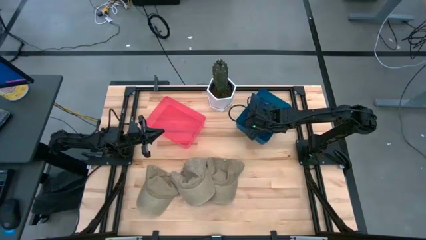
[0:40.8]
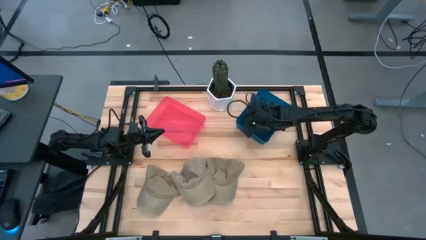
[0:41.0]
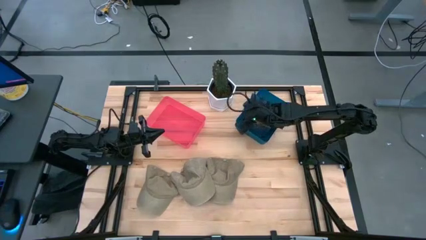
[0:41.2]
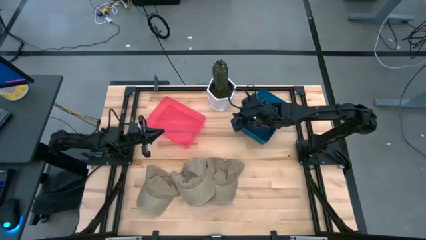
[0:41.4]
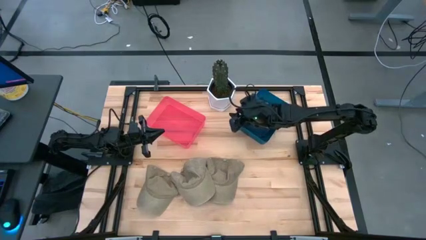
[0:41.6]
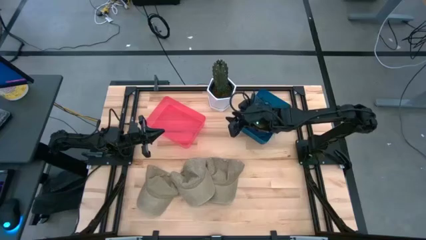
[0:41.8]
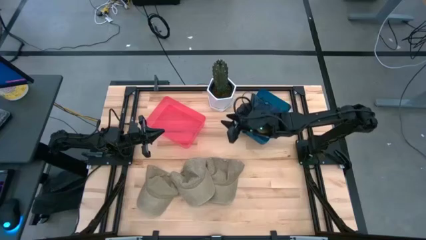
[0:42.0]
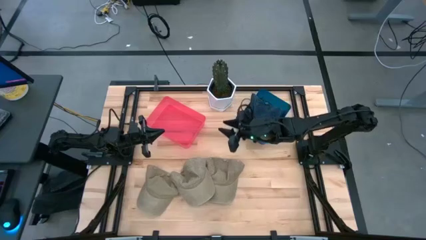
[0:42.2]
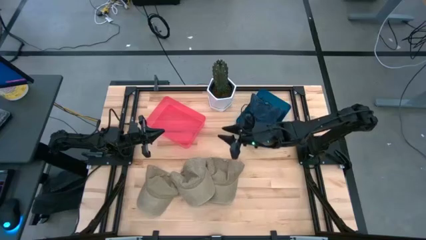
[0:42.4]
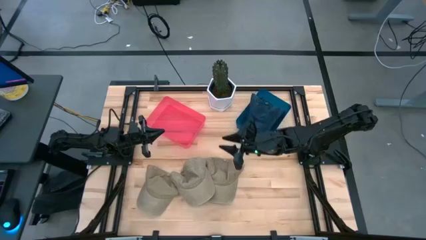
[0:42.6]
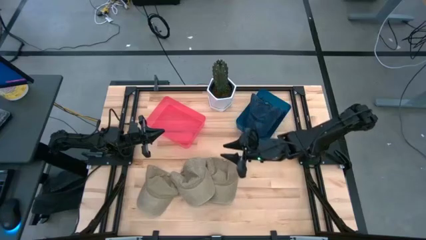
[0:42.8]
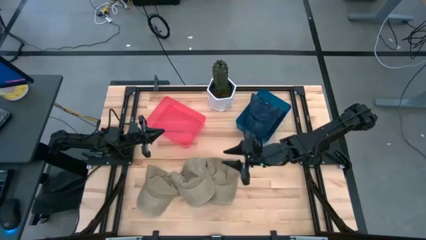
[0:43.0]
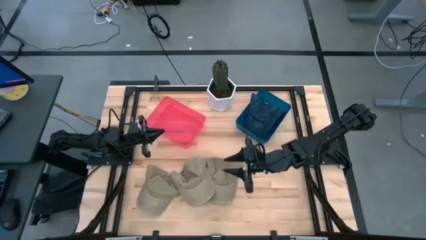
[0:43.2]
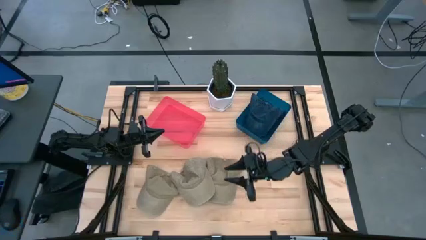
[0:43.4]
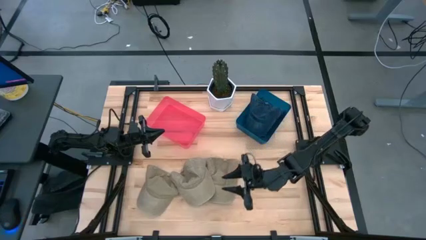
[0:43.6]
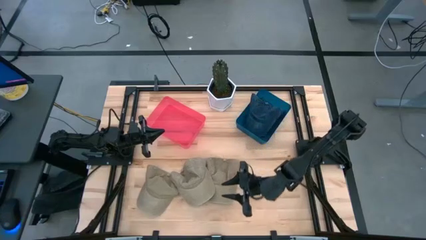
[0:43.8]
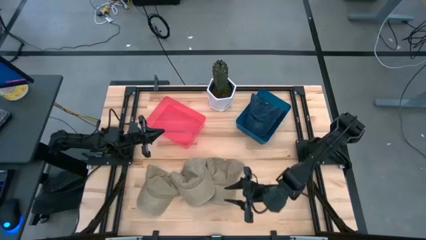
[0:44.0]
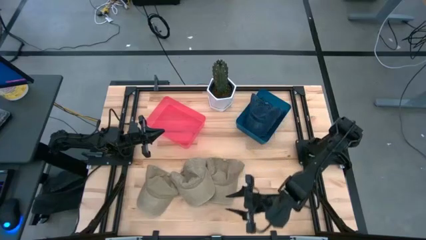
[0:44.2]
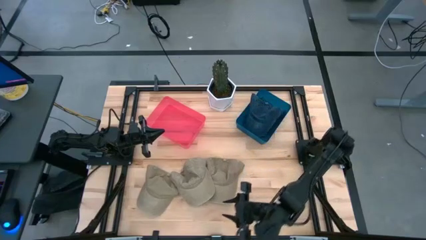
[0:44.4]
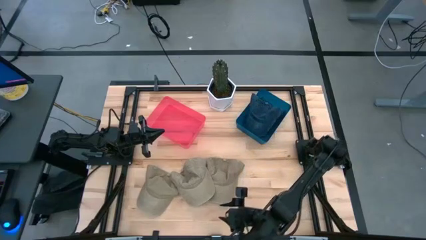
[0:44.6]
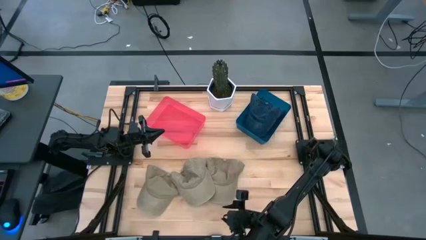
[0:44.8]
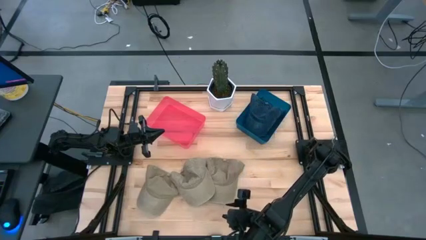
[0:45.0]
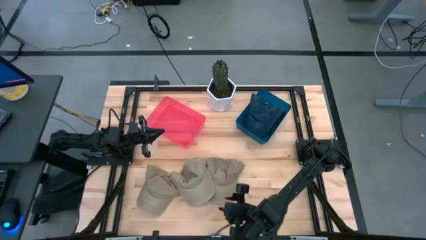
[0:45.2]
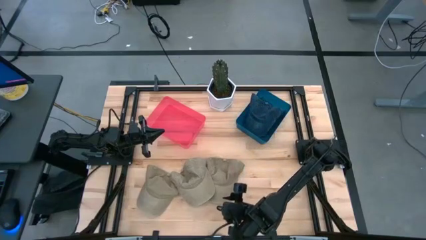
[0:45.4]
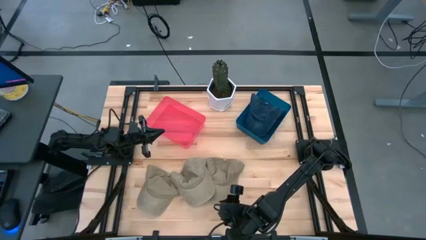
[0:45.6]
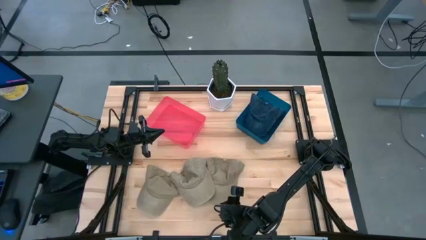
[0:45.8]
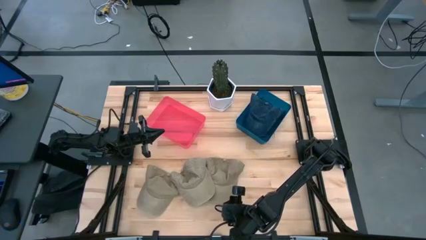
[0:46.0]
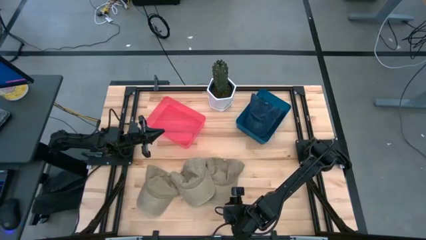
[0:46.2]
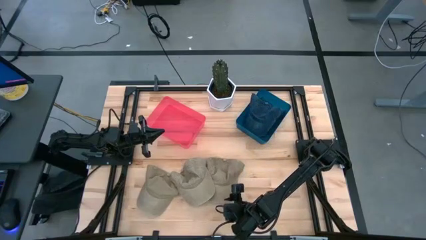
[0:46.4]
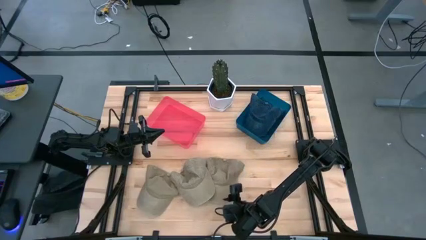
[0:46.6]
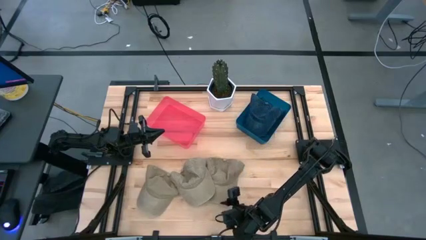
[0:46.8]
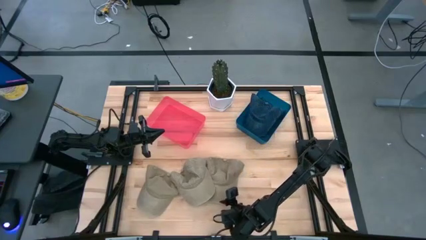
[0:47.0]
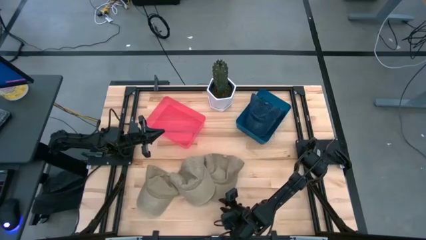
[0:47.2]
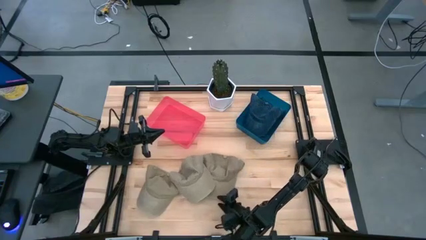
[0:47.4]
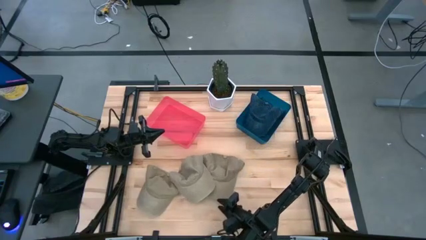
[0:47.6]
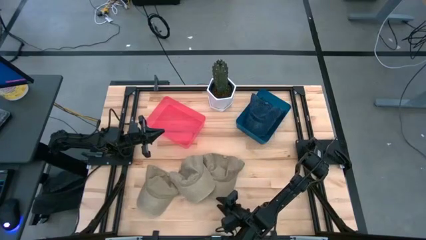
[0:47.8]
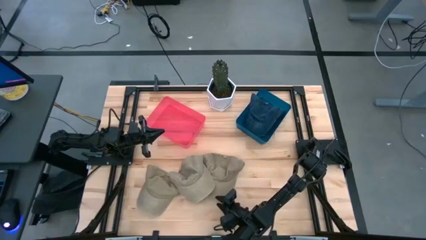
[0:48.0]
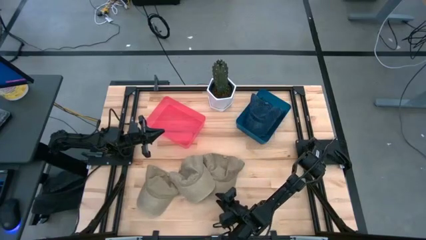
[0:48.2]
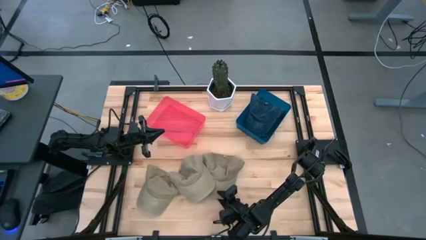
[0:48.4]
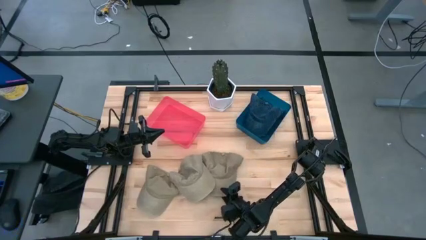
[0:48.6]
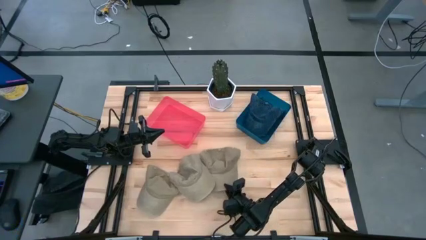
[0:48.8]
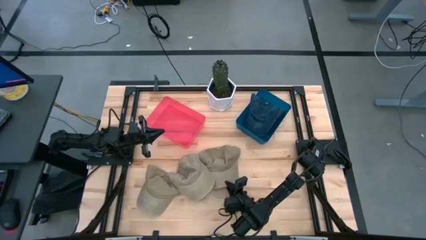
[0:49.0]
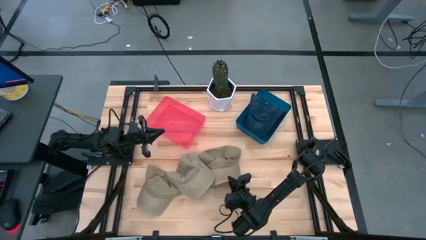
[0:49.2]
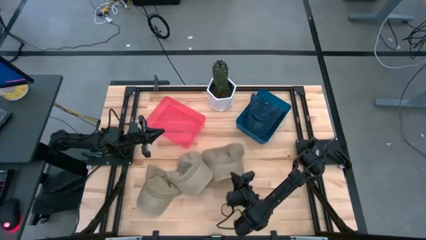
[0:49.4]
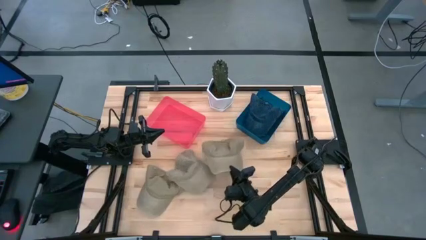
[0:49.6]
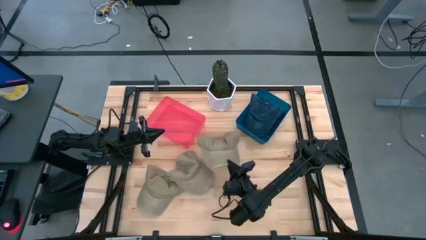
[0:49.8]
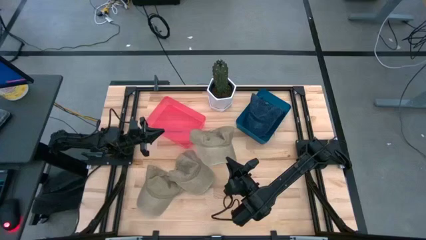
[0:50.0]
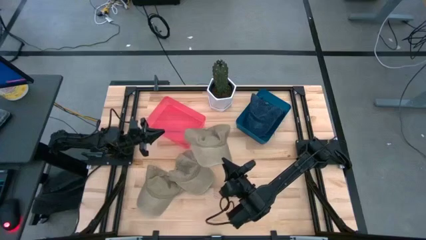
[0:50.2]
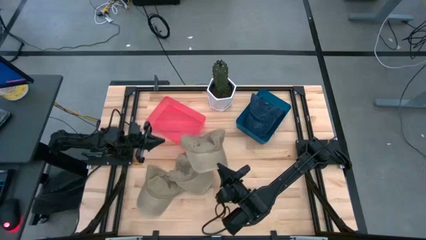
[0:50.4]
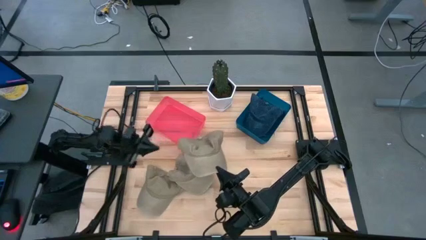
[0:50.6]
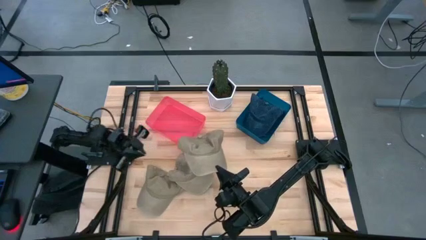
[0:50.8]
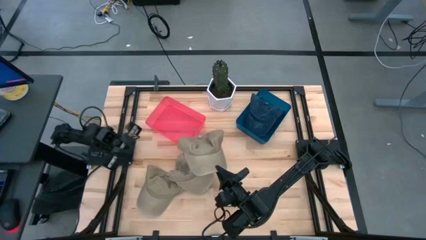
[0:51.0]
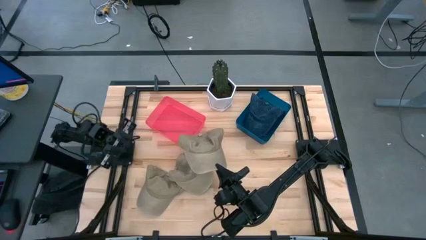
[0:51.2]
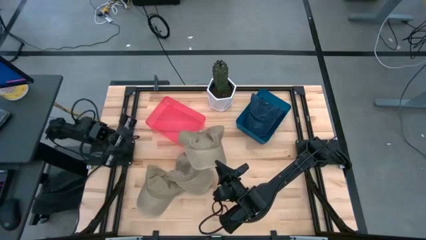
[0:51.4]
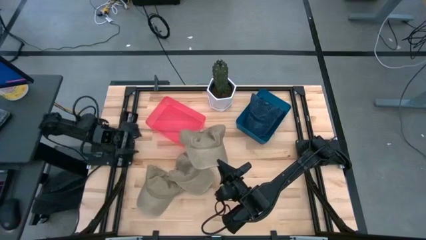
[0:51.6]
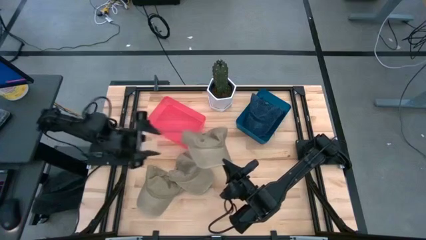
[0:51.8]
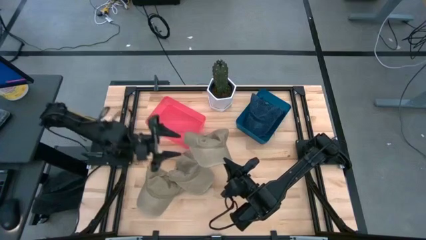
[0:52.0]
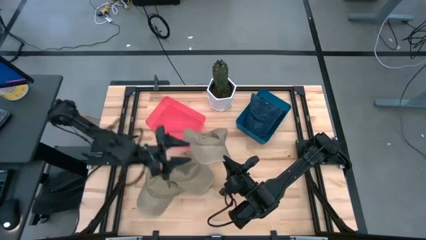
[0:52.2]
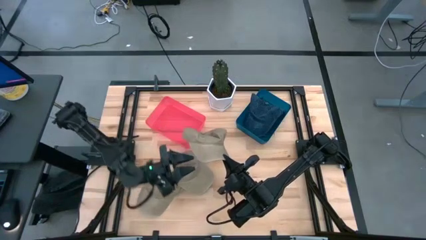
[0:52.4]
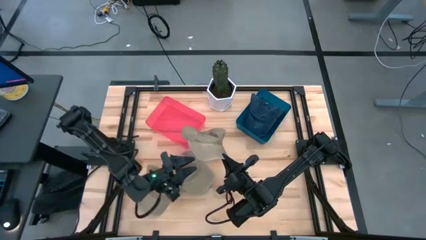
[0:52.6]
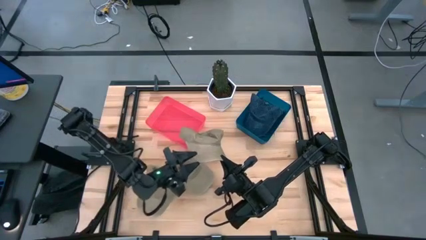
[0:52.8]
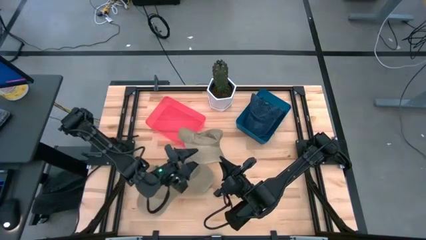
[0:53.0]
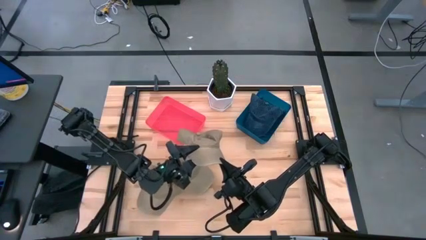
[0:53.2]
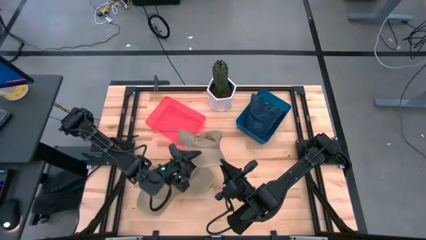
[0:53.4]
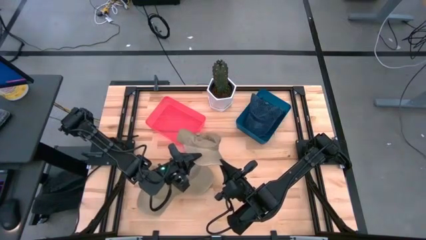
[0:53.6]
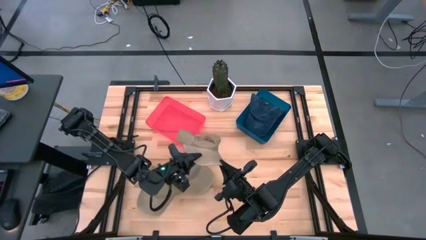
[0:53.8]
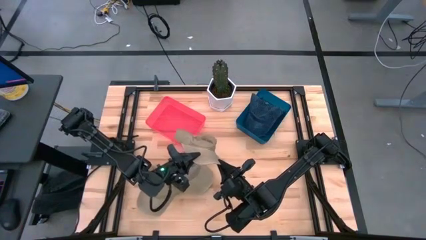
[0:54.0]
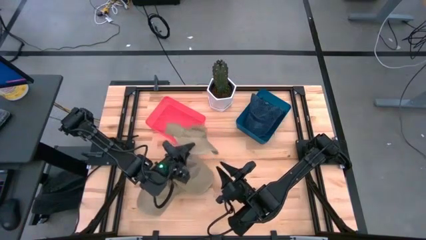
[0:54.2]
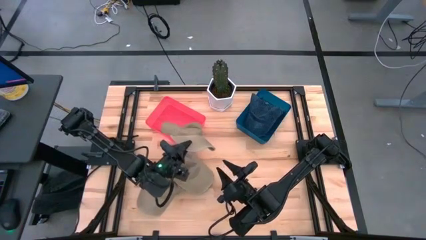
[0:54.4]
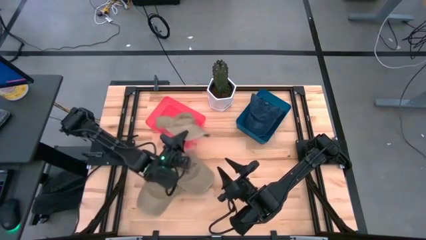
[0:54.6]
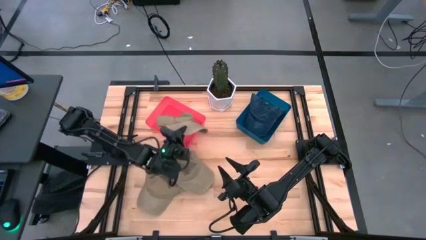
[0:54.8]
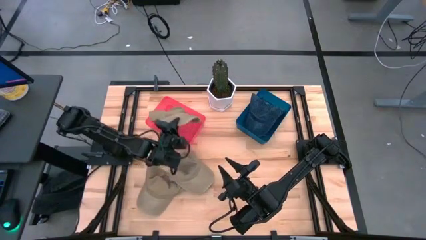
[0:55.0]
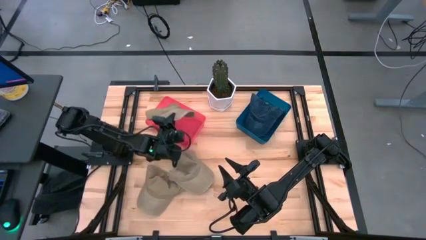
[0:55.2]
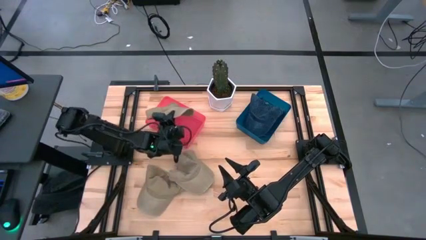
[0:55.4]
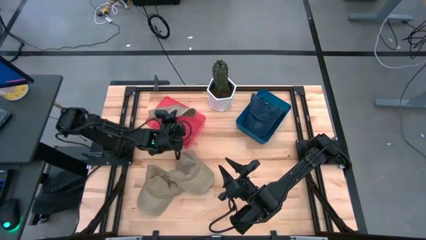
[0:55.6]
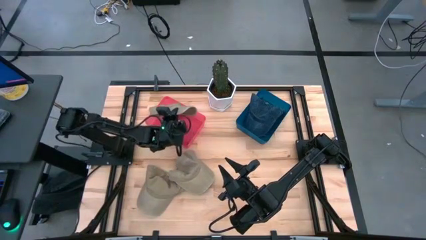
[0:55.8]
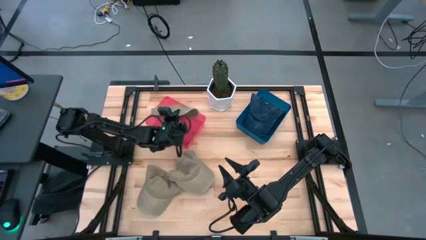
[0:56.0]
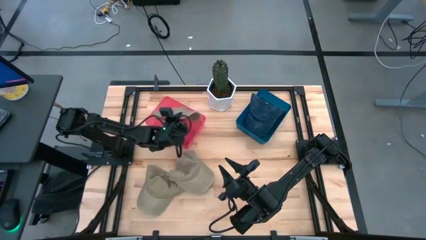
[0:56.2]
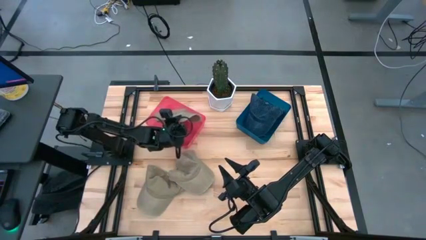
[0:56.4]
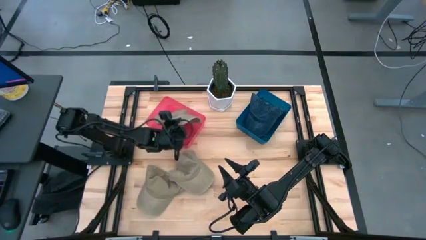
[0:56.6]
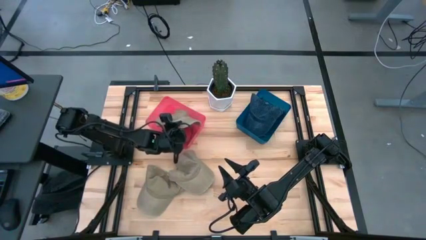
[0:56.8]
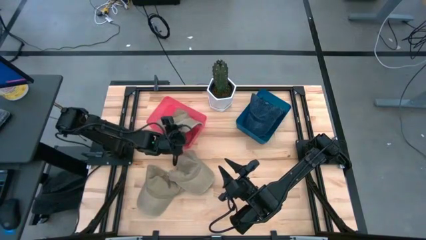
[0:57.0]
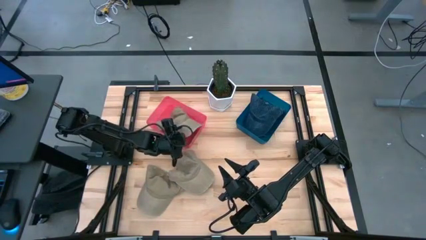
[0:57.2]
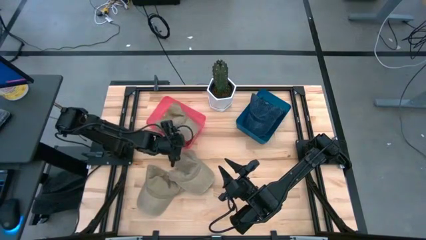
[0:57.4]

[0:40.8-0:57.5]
Task: Pick & Place hat
Put the right brown cap into the red bin
